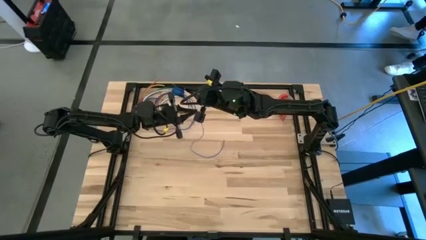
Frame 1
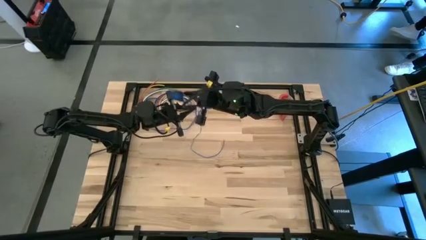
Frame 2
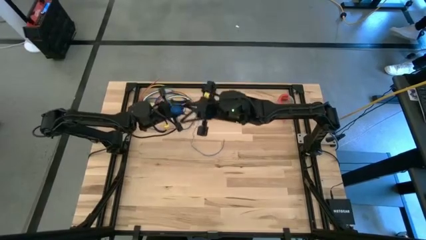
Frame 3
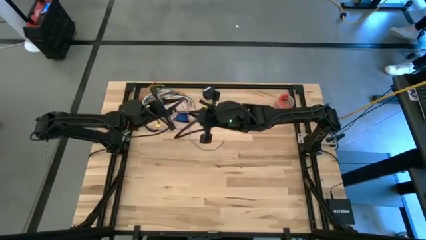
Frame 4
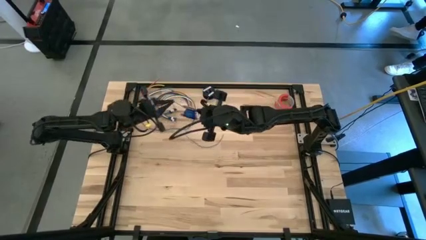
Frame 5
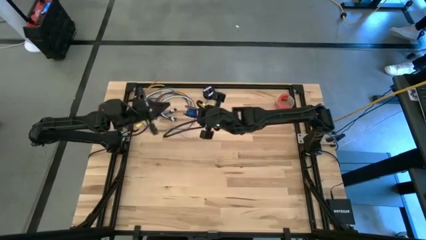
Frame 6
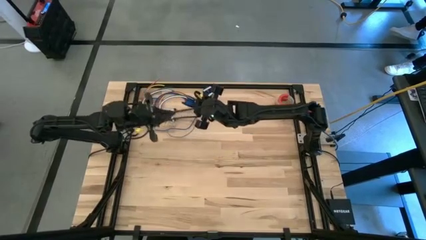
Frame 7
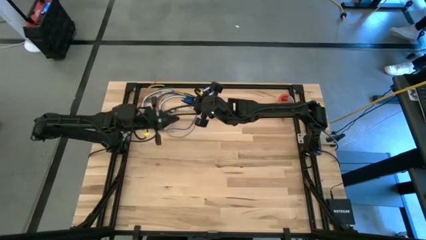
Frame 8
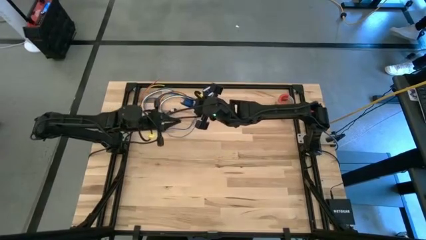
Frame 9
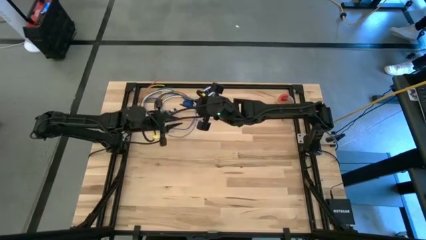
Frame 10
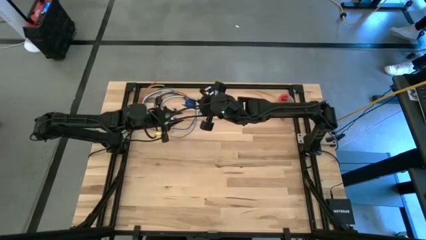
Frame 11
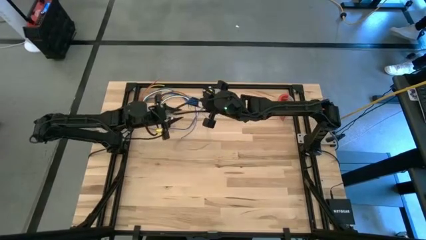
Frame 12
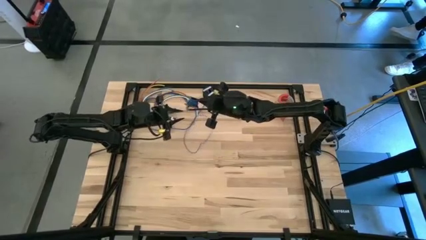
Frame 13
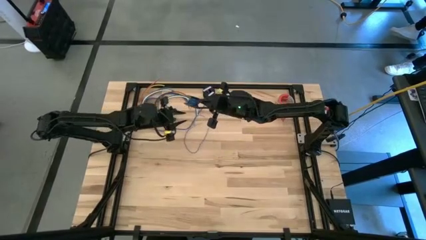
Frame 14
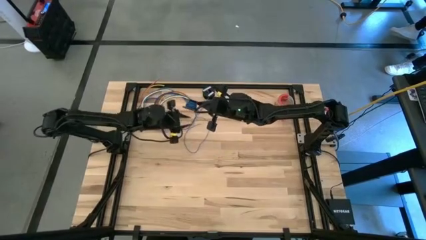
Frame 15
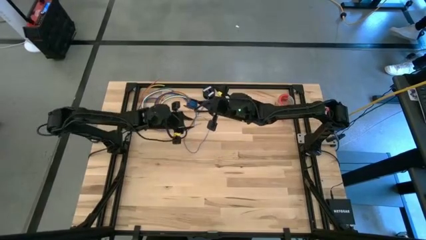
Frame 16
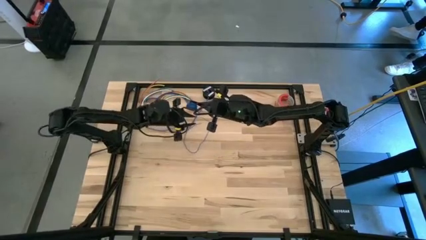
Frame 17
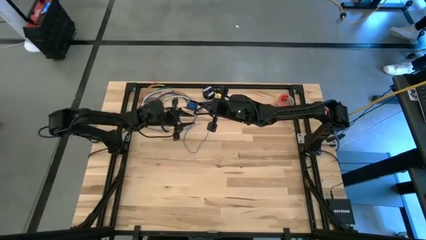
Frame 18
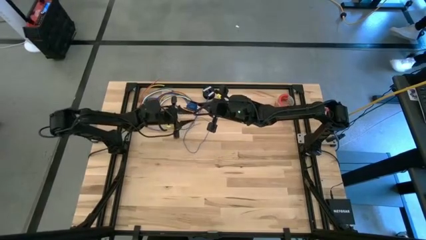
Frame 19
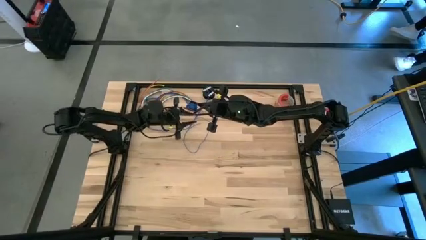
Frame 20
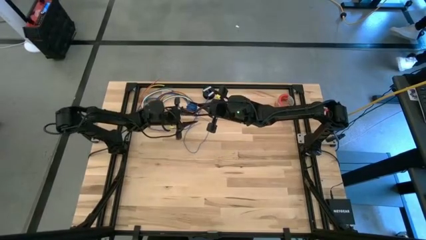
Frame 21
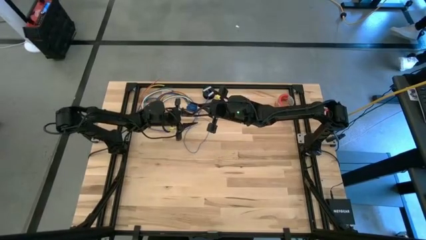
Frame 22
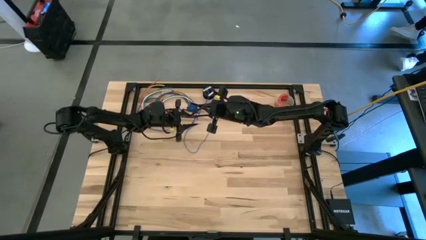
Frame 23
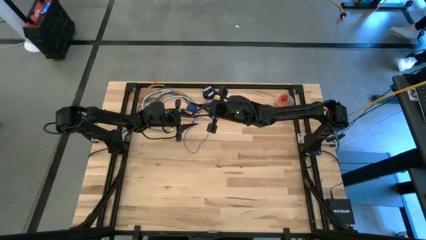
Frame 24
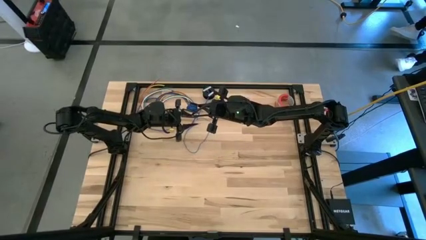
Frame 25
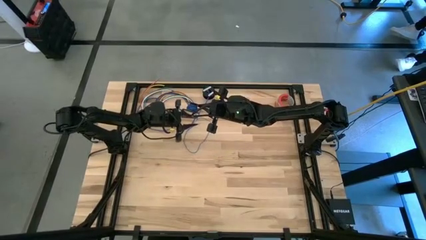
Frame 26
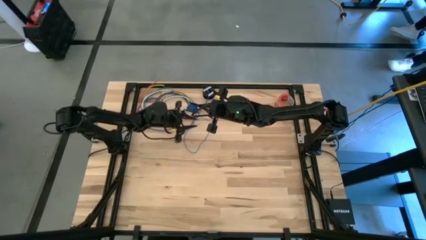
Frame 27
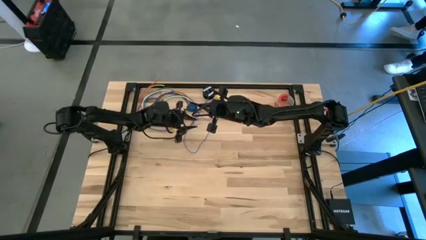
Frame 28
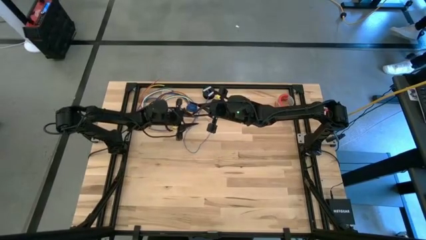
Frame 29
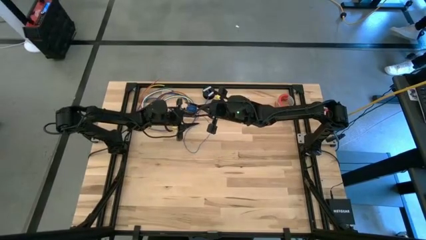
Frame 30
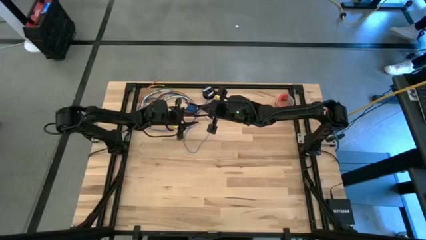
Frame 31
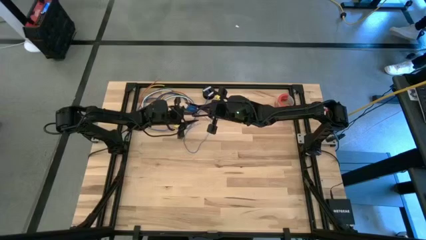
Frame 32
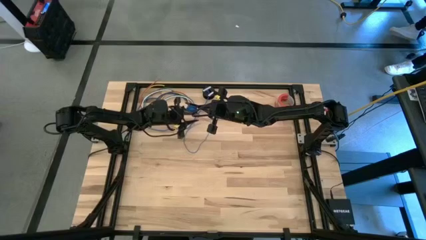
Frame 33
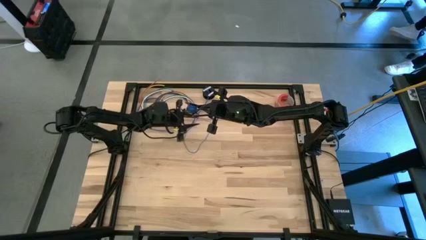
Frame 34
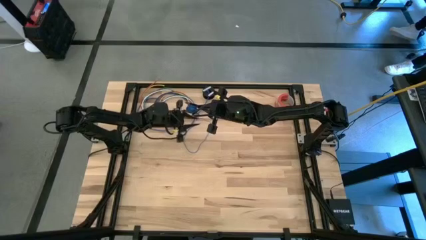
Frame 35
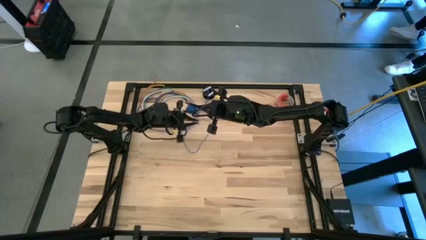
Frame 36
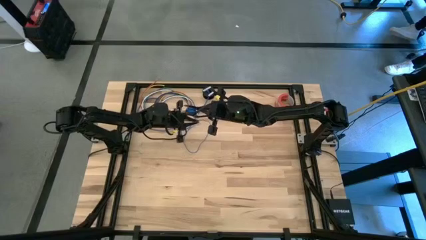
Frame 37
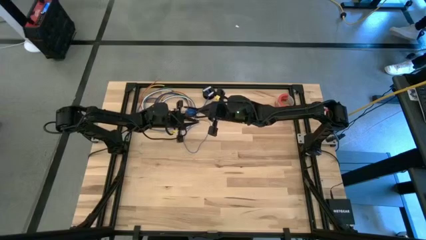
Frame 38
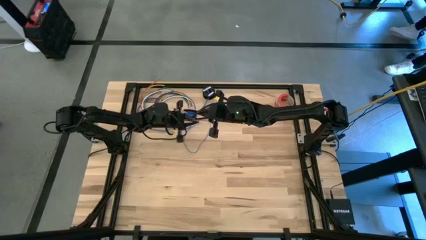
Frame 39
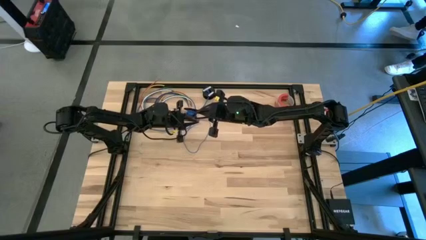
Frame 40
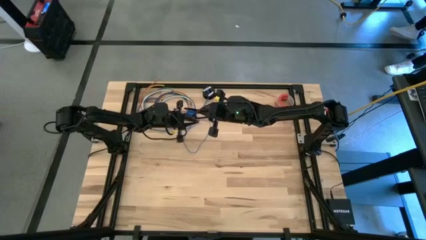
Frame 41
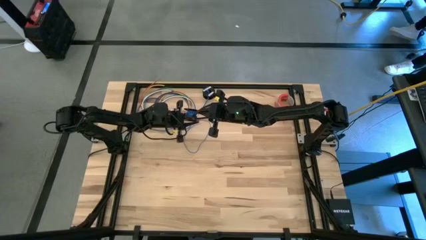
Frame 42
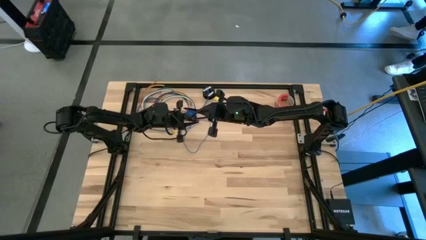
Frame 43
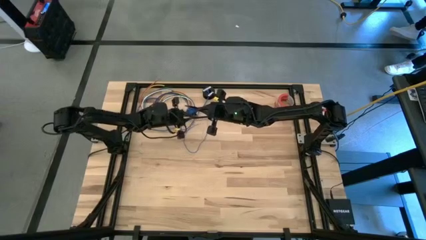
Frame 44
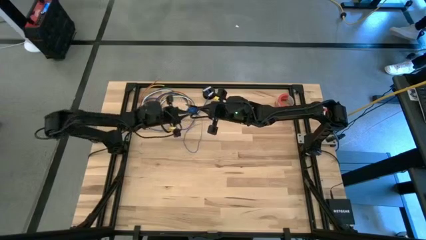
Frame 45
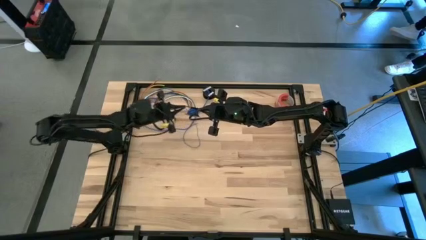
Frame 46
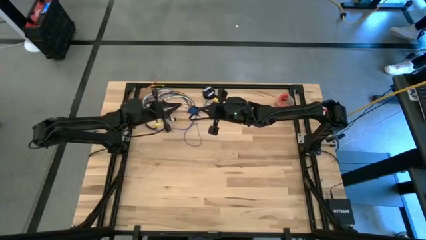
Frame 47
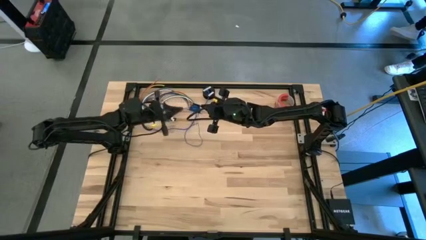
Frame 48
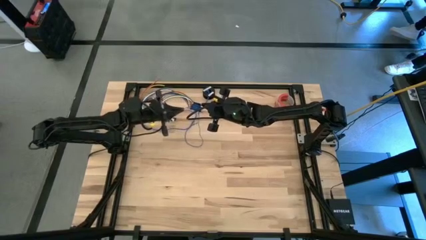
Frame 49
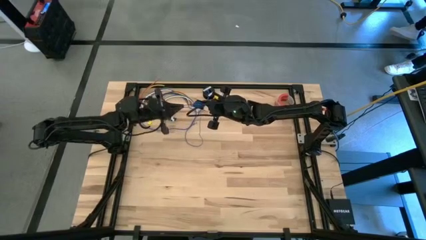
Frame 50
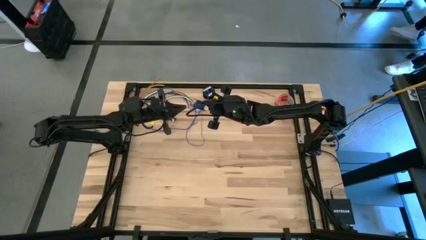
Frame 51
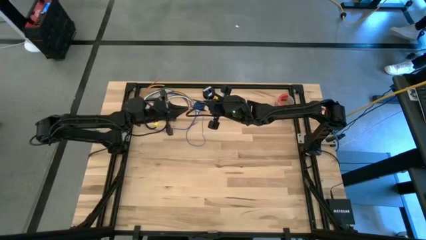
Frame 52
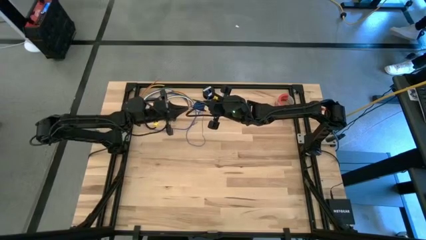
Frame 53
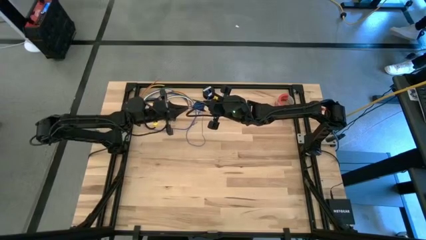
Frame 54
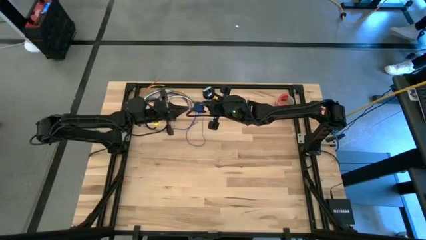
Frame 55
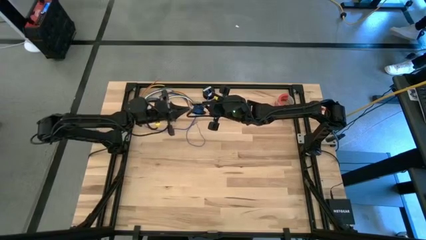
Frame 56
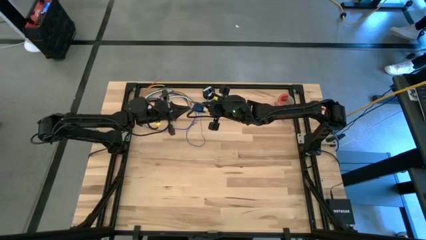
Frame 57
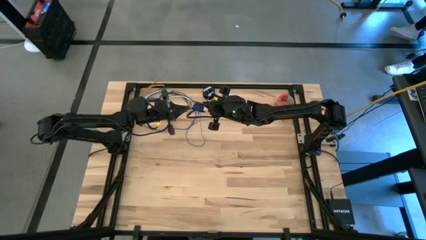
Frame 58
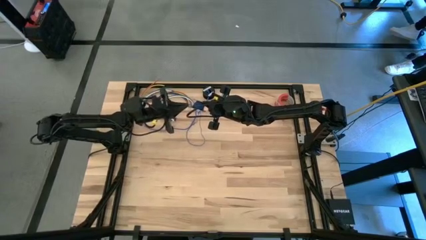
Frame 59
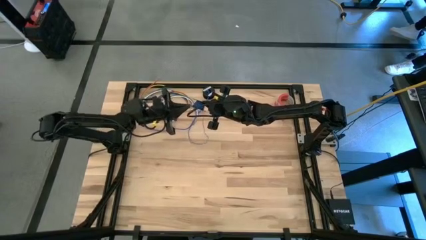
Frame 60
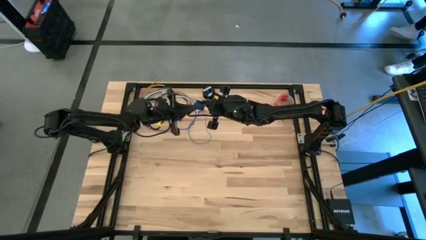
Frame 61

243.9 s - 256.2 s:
Task: Coil cords
Coil the blue wire onto the black spool

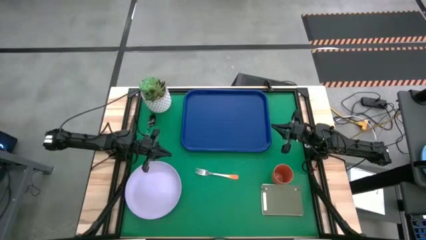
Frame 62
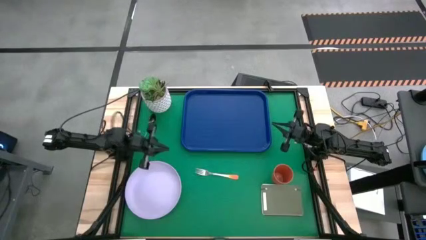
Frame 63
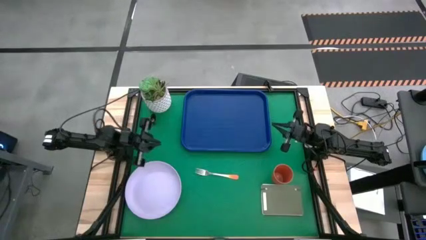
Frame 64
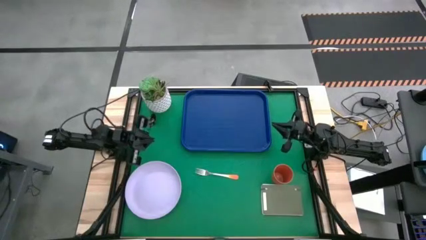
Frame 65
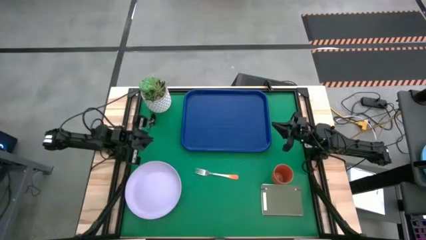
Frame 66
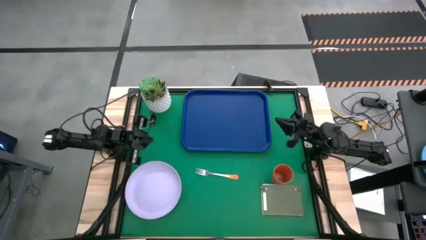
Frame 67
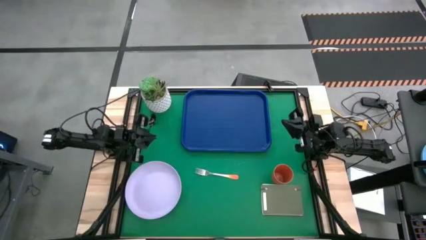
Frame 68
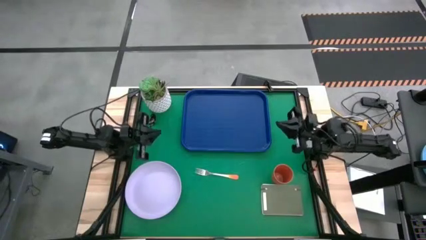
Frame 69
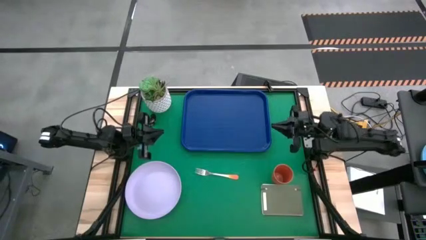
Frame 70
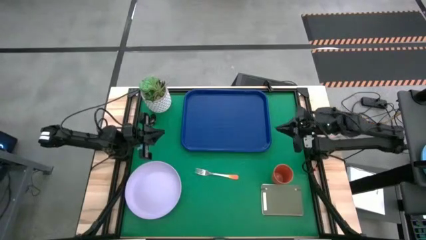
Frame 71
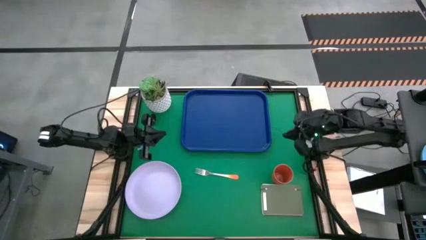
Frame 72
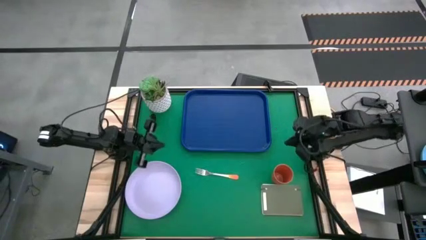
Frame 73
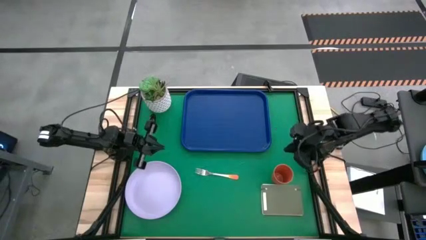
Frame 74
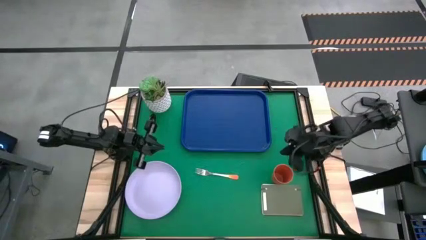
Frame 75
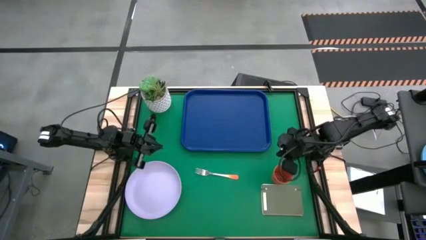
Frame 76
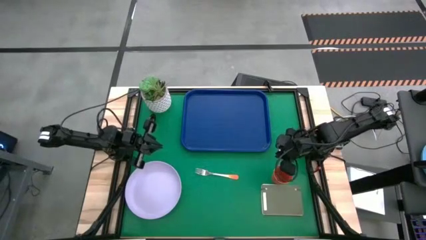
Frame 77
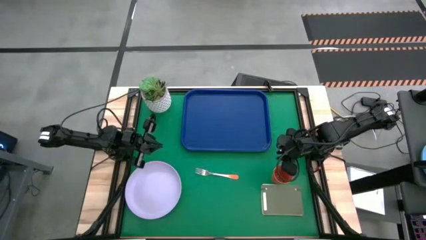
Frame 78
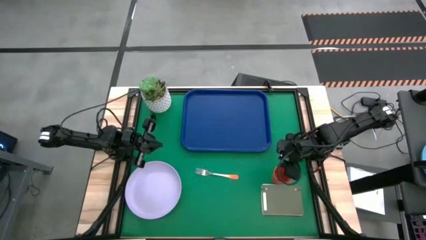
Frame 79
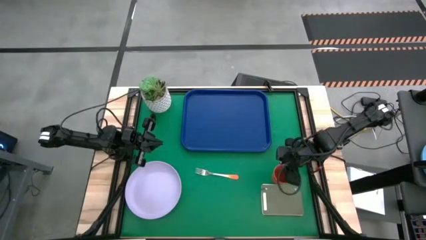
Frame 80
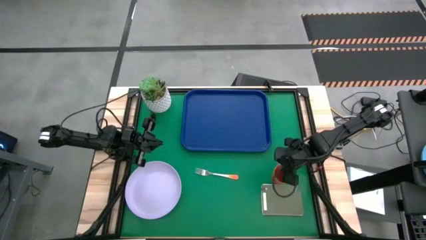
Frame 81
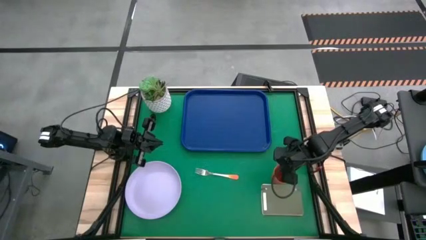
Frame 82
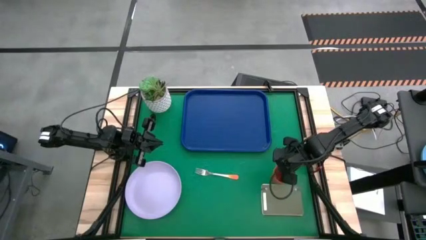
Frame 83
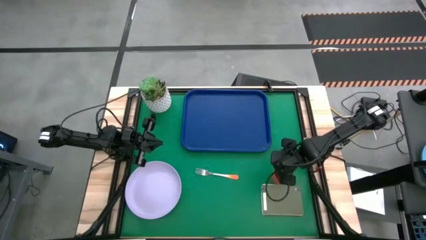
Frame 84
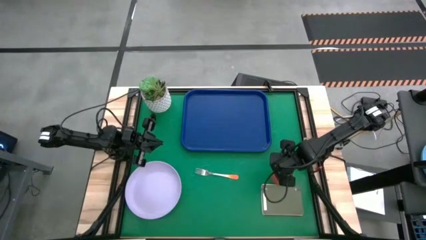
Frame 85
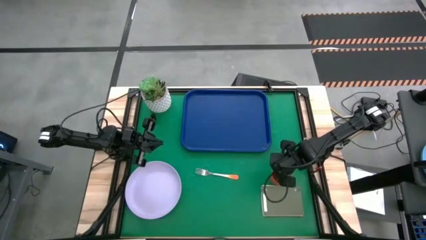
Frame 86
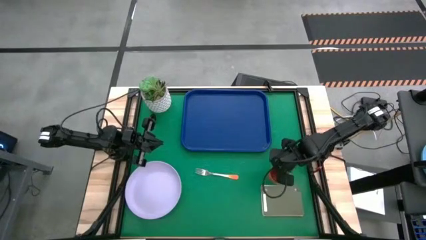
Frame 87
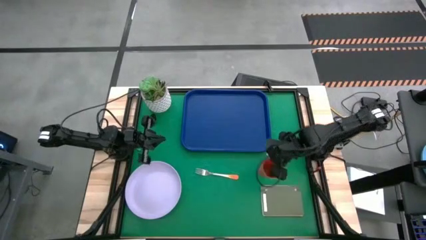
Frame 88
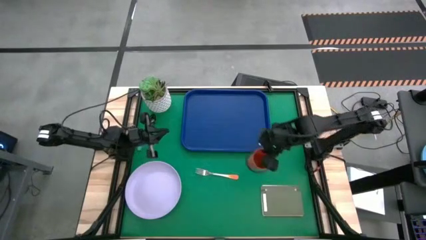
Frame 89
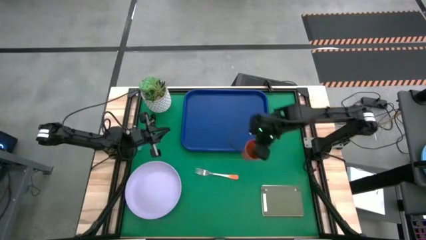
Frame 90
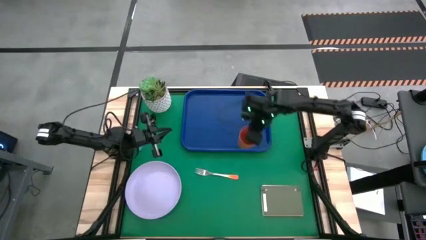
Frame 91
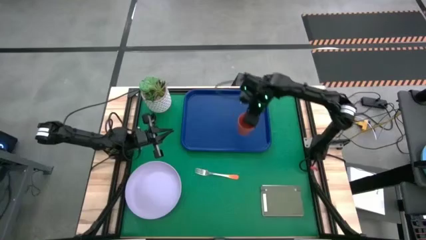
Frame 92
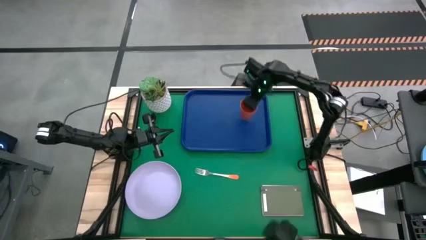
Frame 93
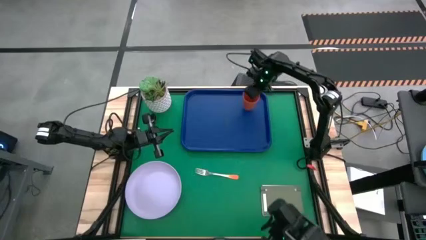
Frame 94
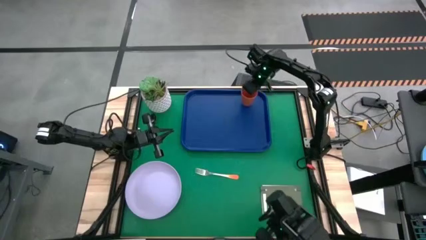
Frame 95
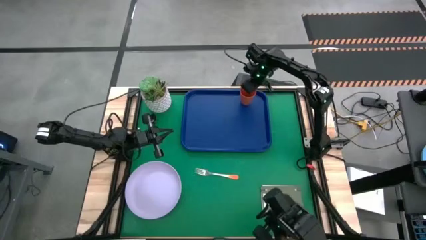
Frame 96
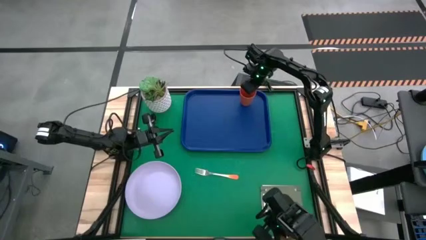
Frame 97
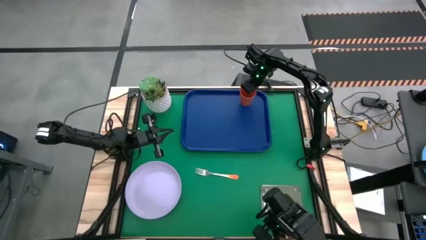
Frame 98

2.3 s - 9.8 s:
Task: Pick and place plate/cup/fork/spoon on tray
Put the orange cup on the top right of the blue serving tray
